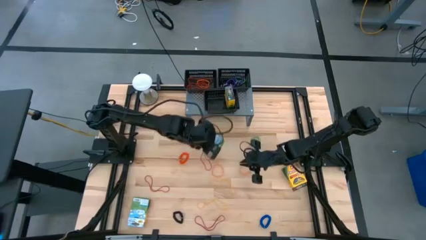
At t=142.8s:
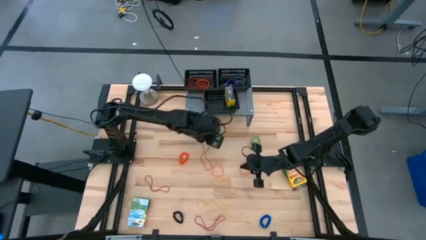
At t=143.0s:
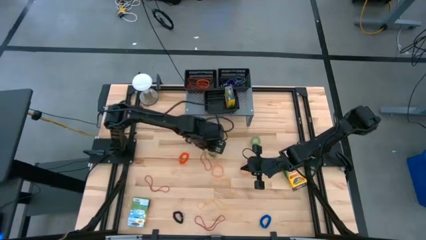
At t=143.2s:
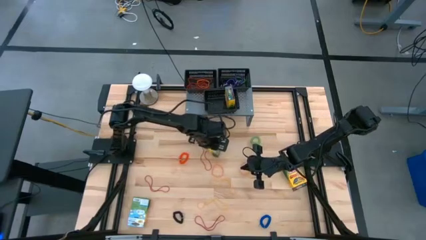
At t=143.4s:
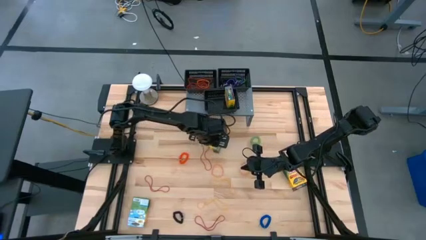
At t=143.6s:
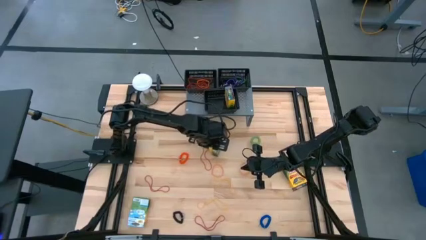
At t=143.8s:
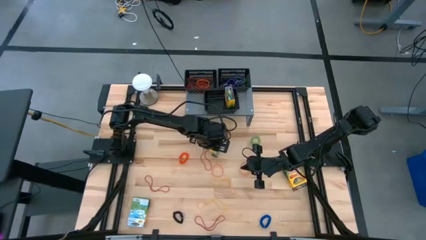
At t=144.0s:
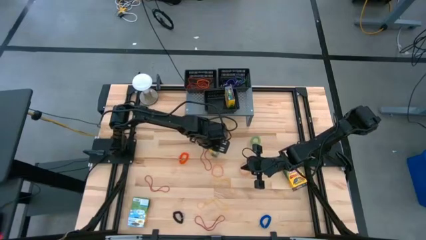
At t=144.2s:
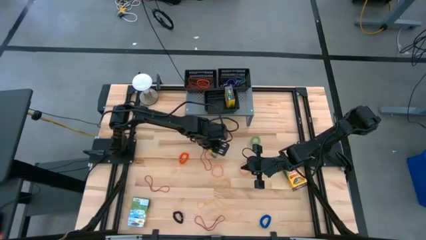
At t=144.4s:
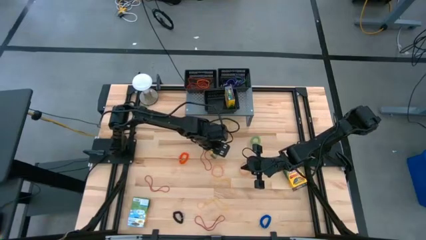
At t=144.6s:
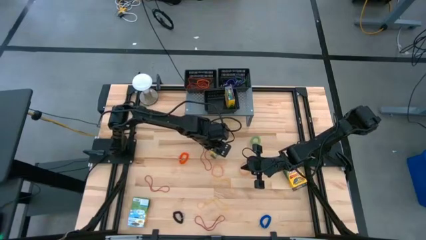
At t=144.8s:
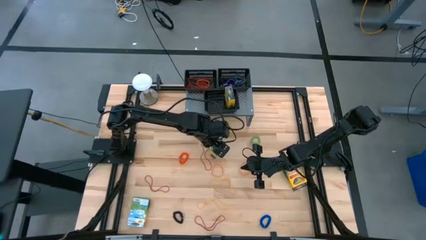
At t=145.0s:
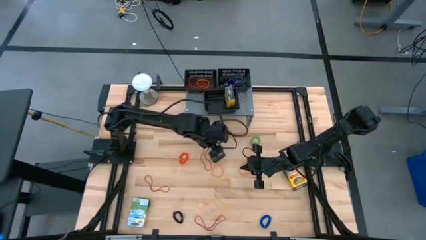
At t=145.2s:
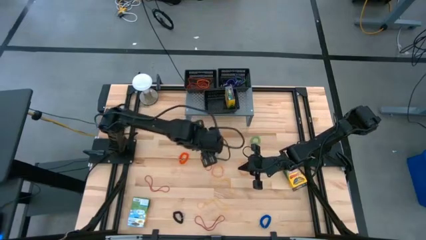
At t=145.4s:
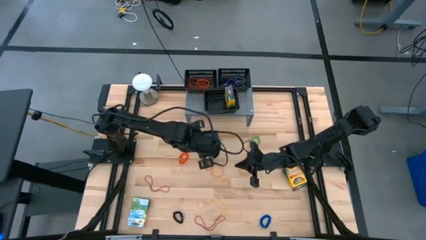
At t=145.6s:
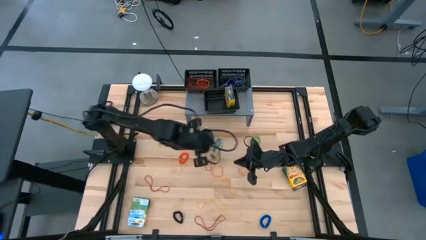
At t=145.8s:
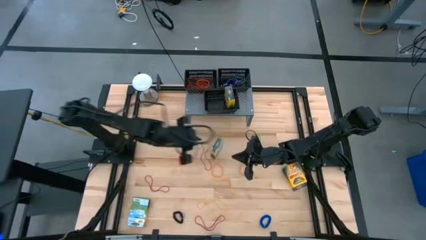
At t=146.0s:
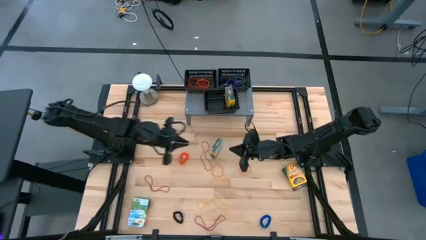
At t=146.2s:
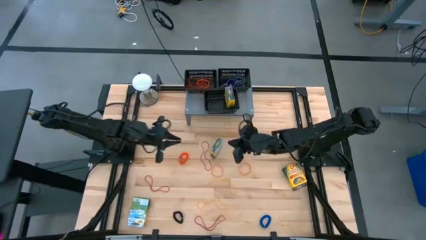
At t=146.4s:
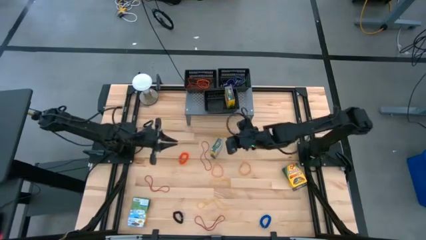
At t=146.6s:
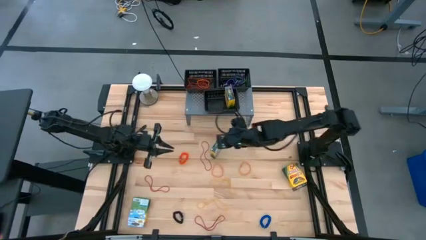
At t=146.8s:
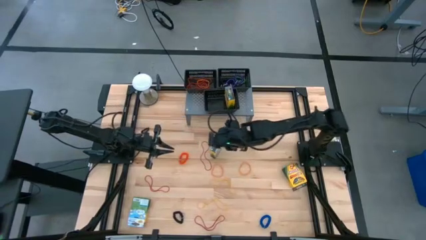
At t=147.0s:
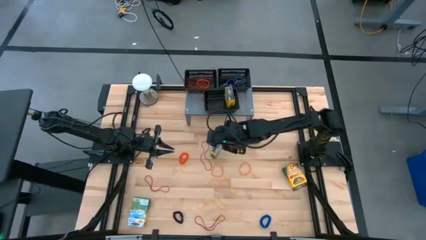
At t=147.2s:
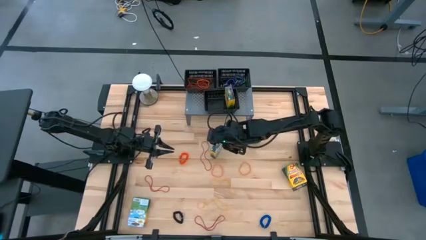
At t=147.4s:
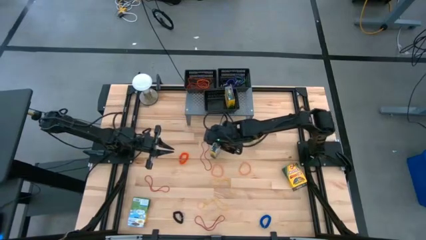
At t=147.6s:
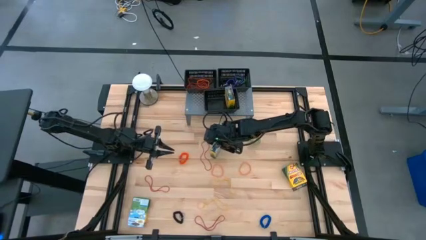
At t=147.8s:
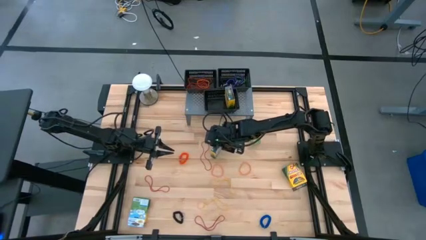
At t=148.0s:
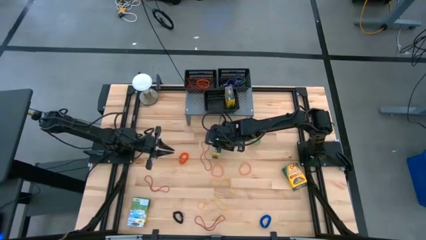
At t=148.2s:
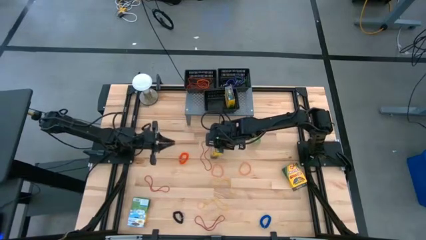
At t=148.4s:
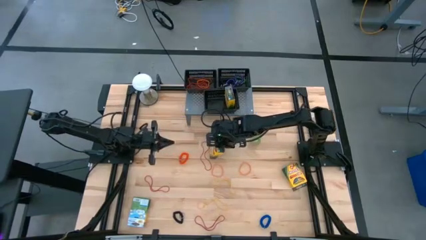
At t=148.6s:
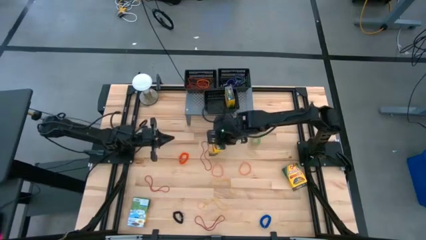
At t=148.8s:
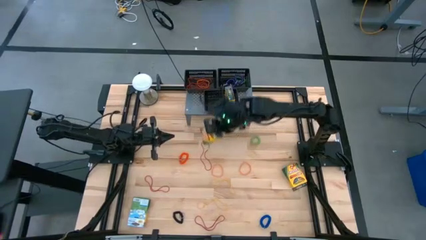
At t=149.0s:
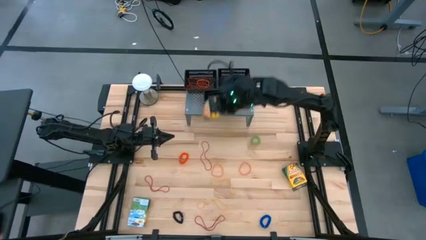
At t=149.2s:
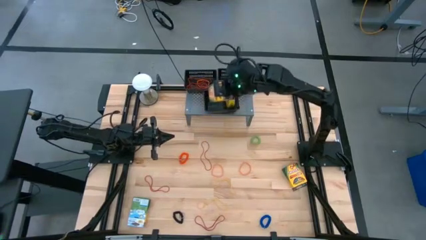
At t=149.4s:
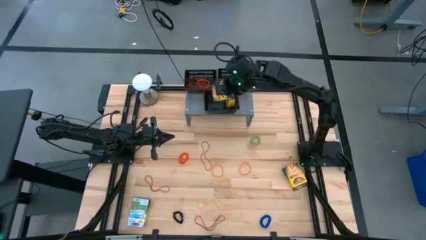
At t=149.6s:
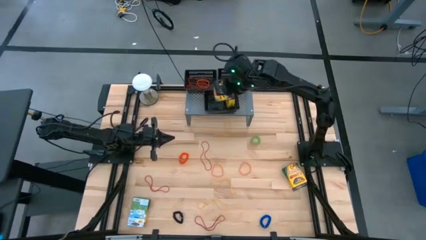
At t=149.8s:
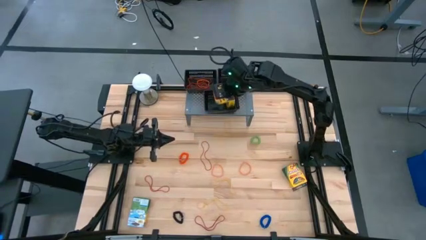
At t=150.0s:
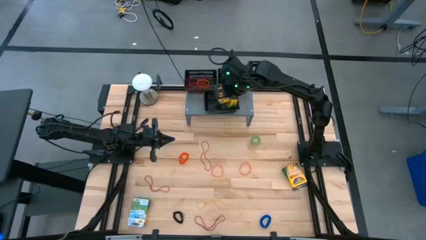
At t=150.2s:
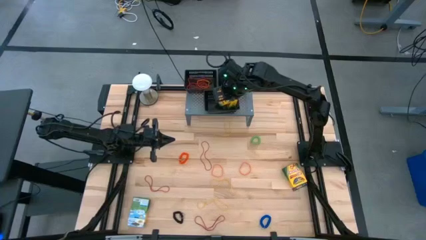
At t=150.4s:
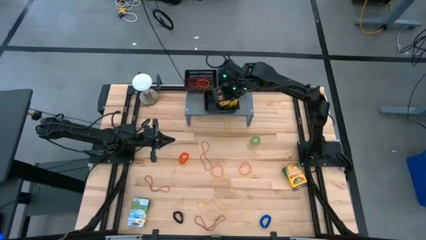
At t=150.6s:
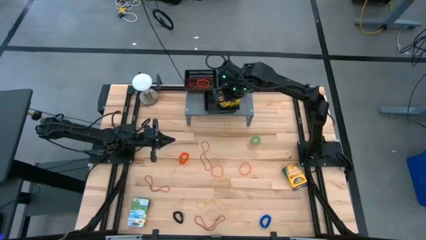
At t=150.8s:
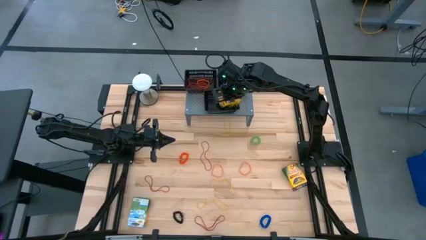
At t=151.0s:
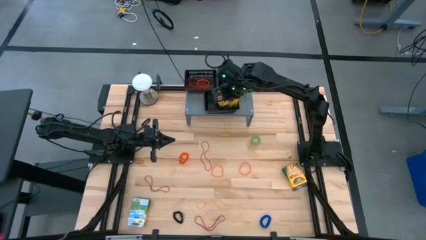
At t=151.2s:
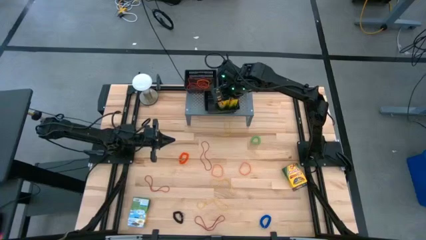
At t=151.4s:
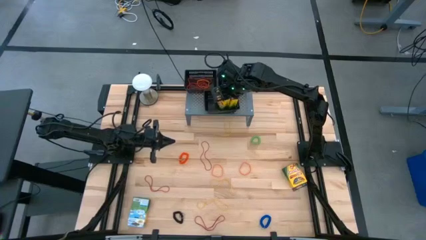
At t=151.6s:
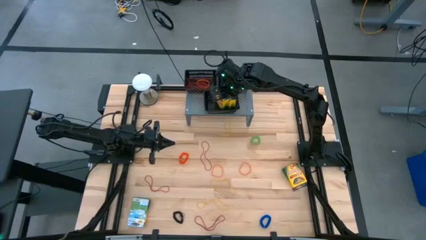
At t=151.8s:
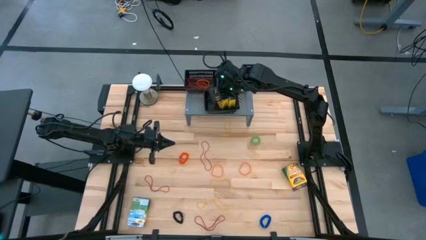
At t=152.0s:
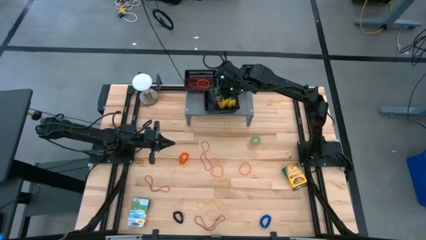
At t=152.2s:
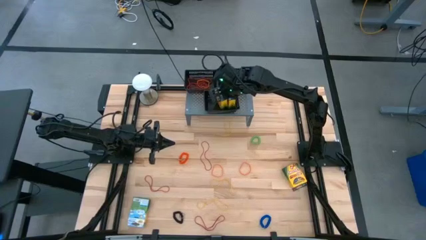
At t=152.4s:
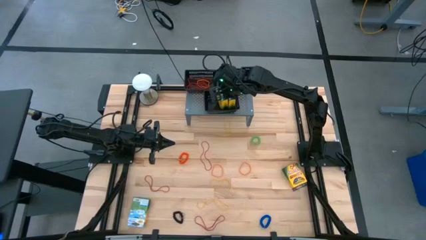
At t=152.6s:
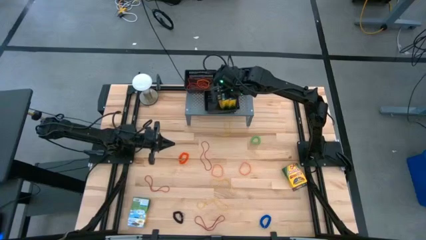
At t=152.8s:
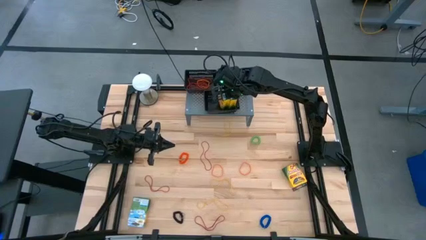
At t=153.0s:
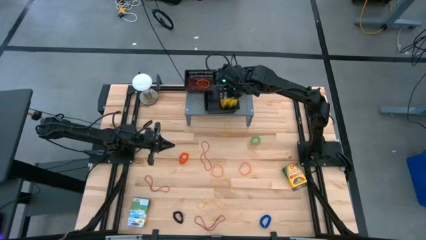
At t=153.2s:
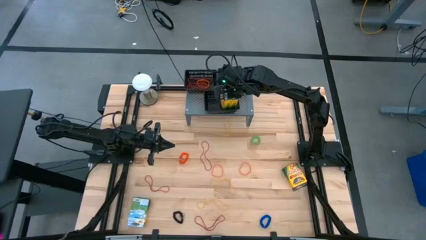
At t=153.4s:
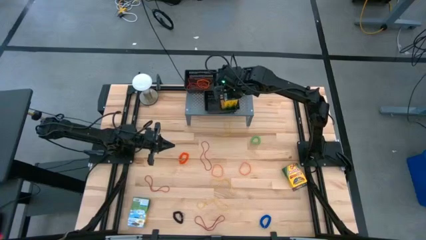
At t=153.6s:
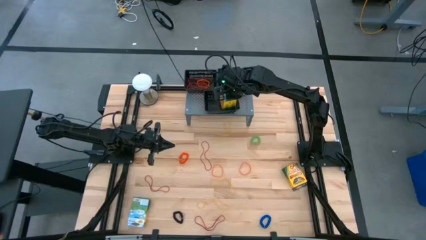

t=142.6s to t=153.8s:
Task: Pick & Place Office Desk Supplies
Put the box crayons into the bottom black basket on the shelf

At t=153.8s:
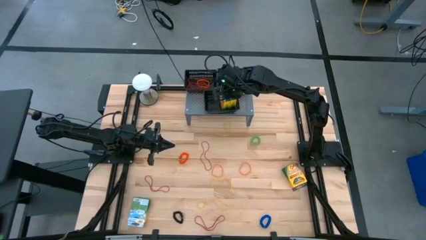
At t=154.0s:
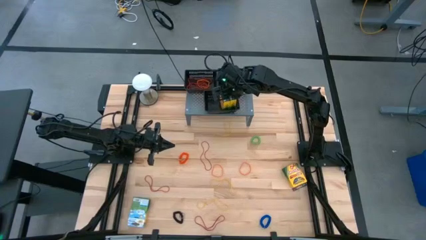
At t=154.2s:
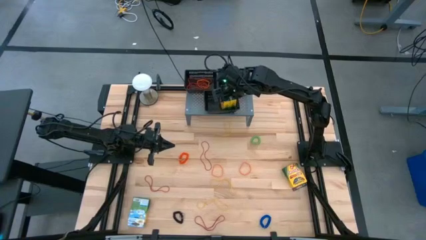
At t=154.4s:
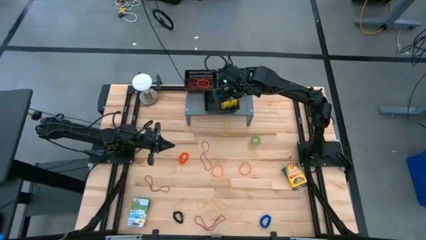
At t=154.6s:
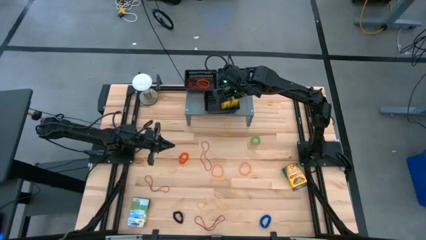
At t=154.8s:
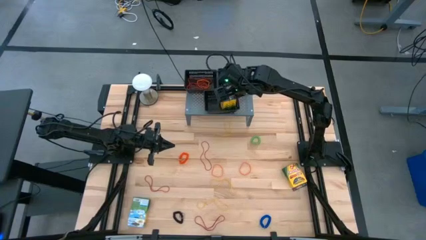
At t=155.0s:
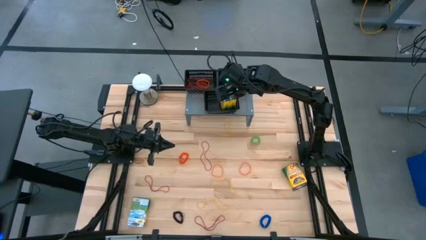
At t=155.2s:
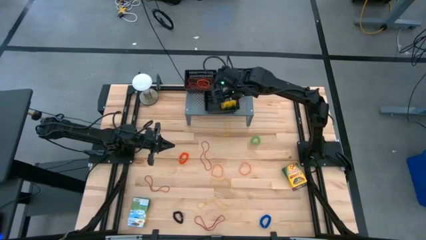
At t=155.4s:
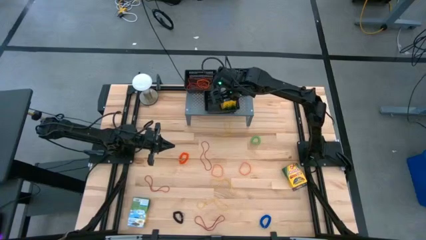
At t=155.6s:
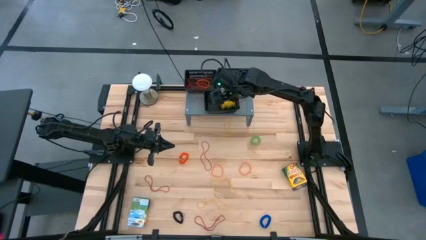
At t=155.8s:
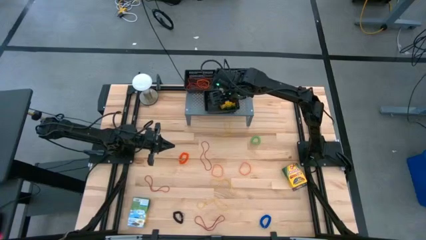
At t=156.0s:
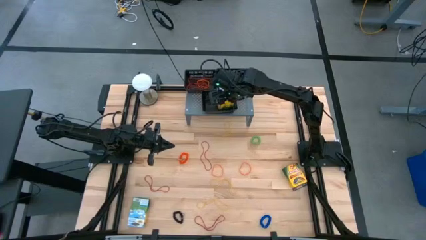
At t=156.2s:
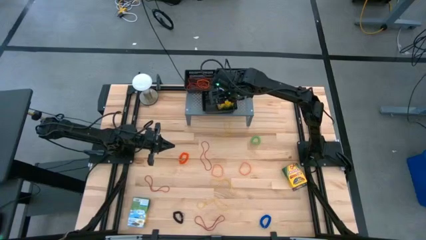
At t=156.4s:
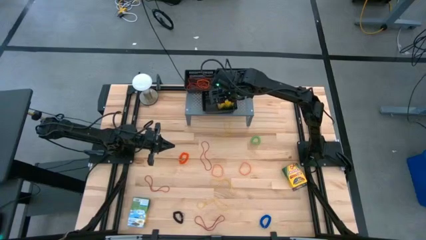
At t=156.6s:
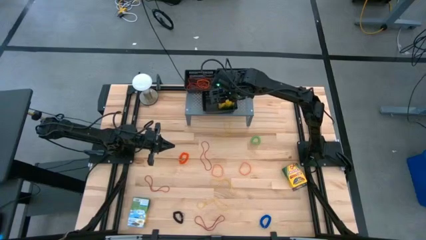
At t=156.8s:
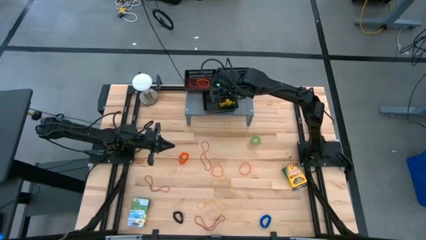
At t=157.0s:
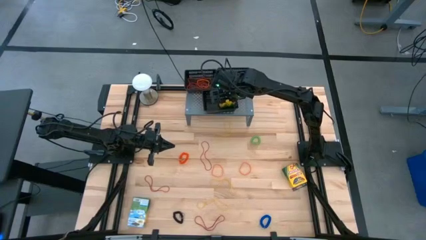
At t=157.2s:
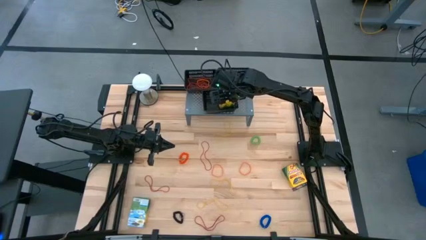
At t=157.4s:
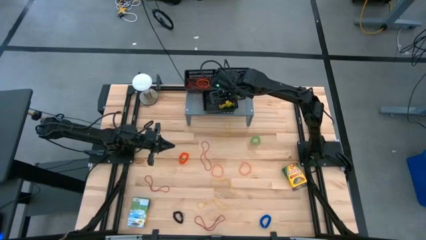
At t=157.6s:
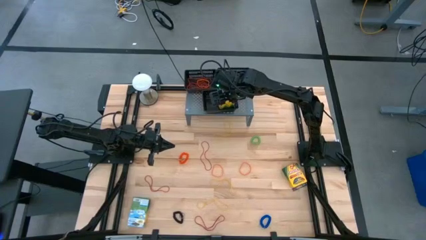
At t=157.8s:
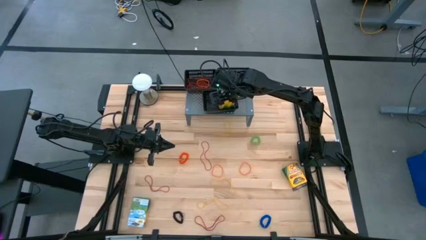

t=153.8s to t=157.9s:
Adjust the crayon boxes in the bottom black basket on the shelf
